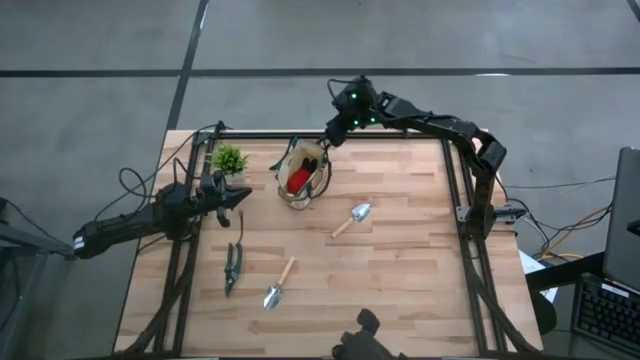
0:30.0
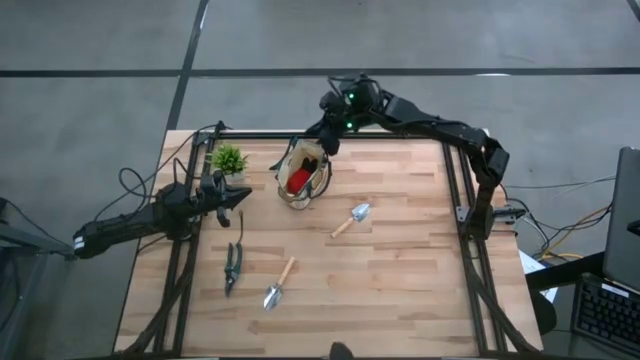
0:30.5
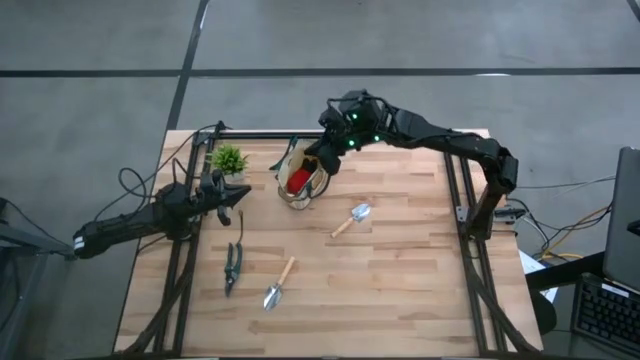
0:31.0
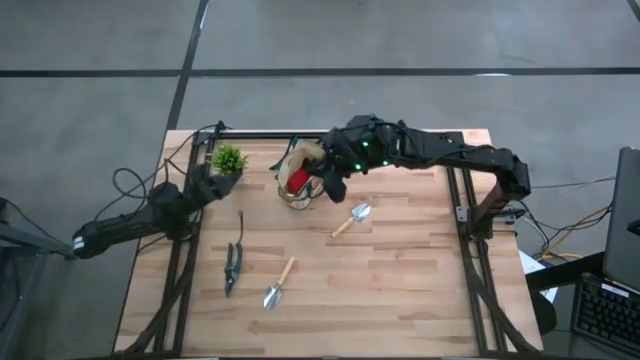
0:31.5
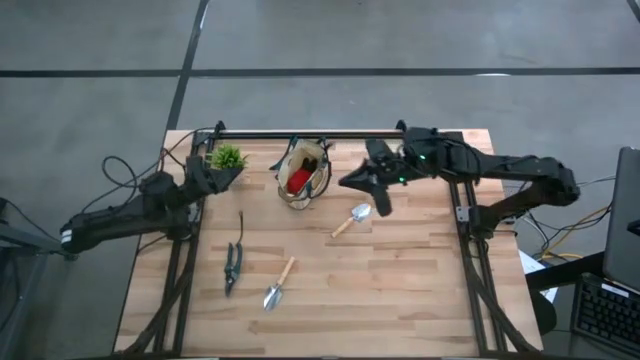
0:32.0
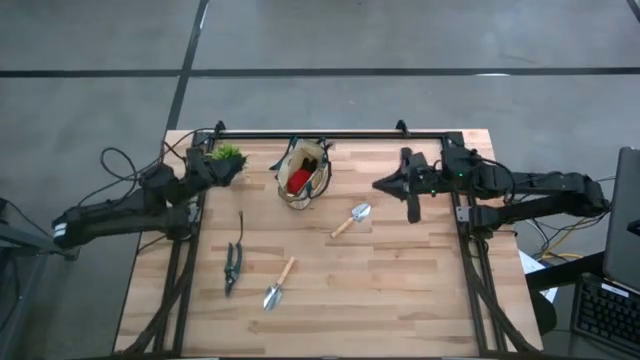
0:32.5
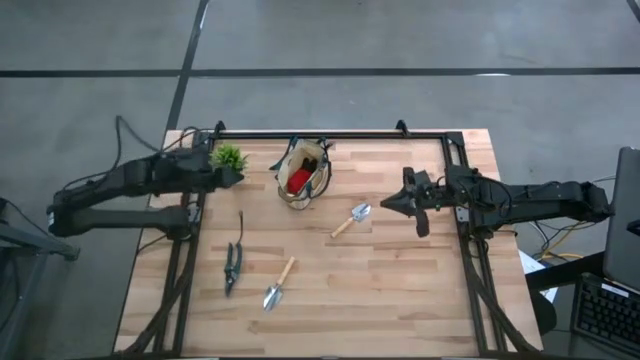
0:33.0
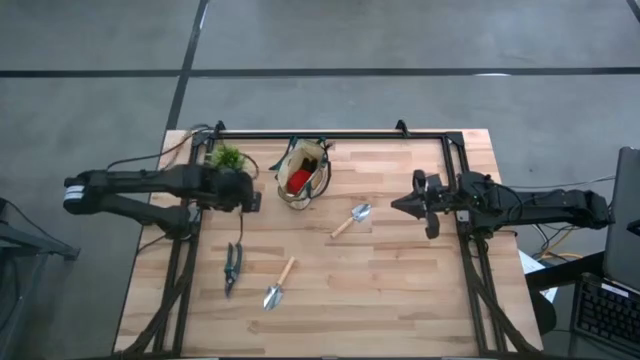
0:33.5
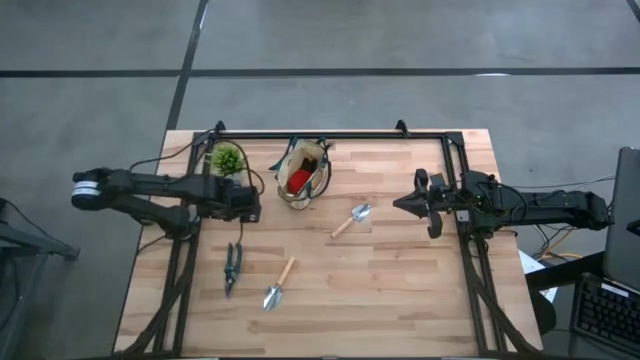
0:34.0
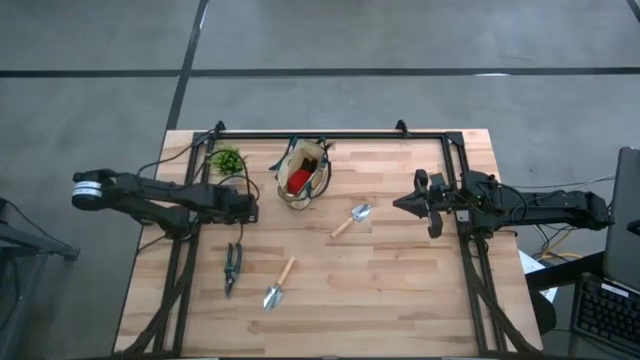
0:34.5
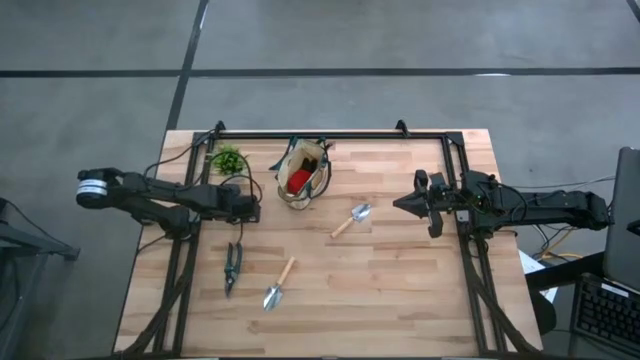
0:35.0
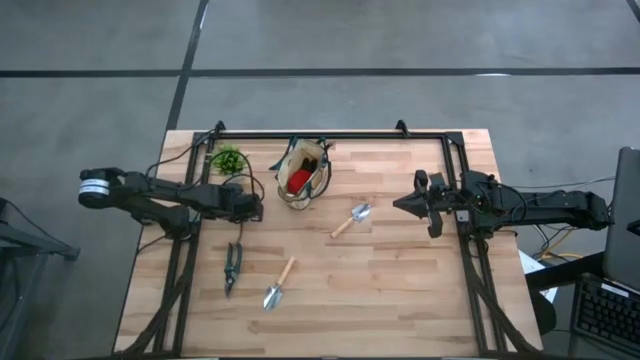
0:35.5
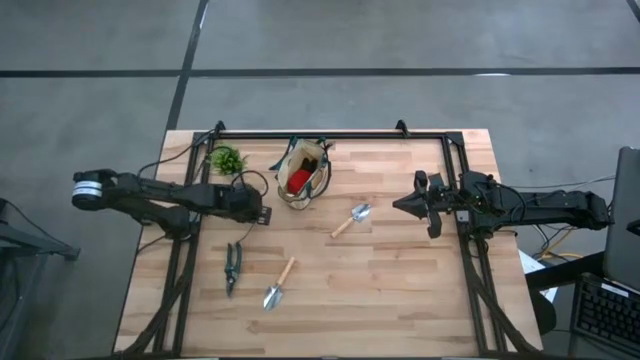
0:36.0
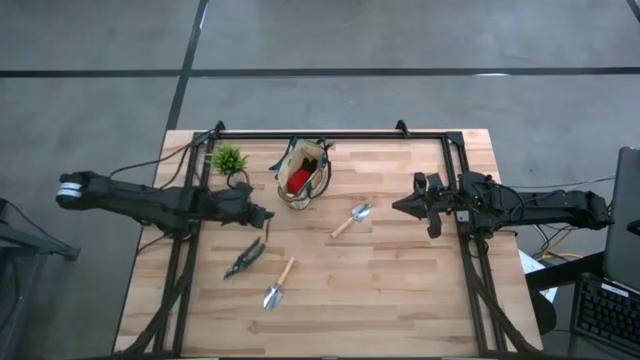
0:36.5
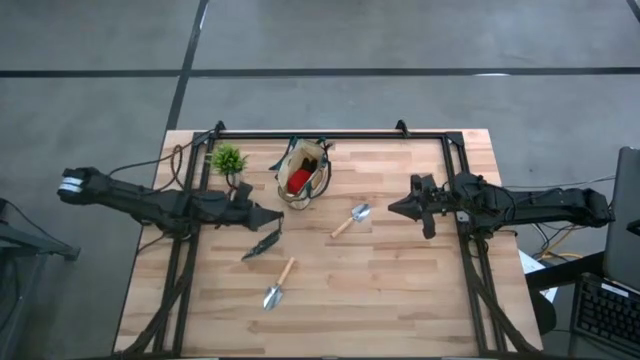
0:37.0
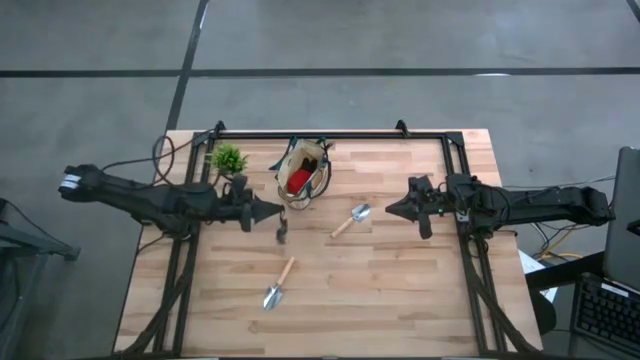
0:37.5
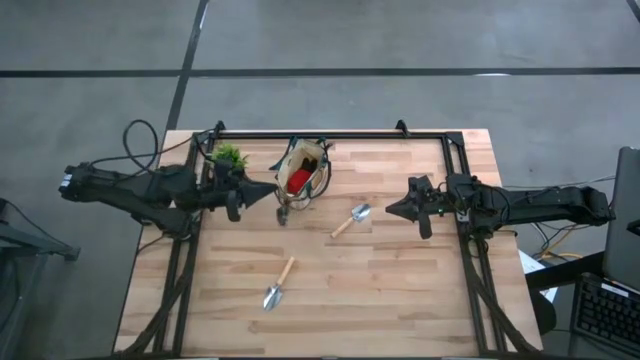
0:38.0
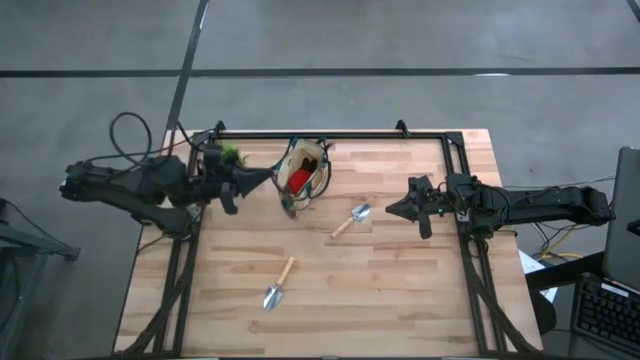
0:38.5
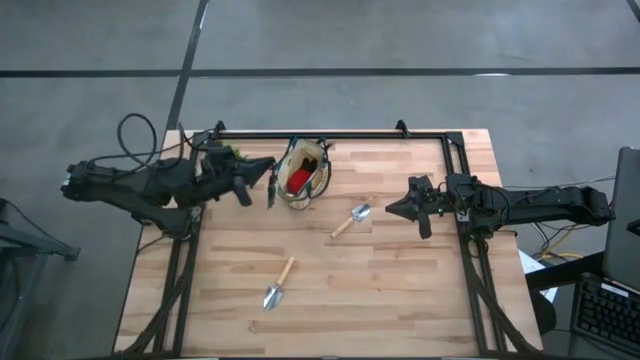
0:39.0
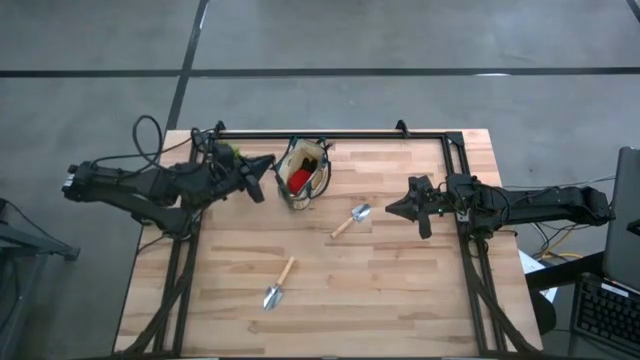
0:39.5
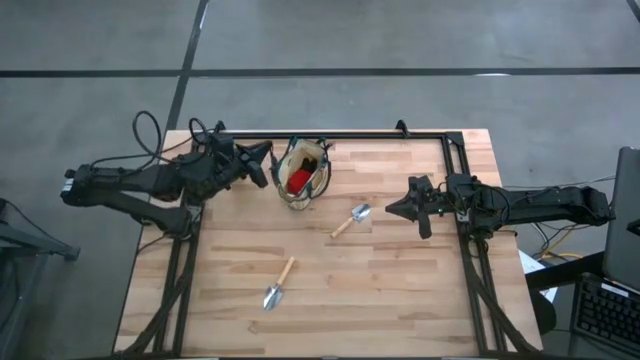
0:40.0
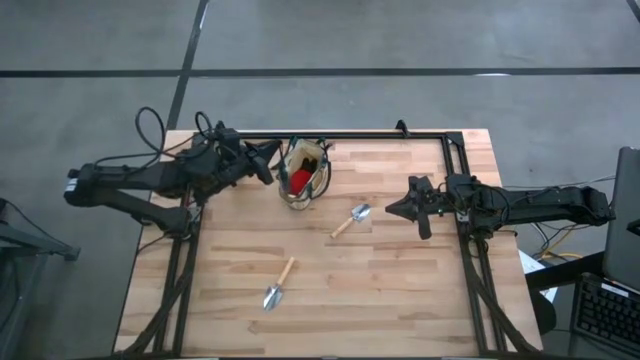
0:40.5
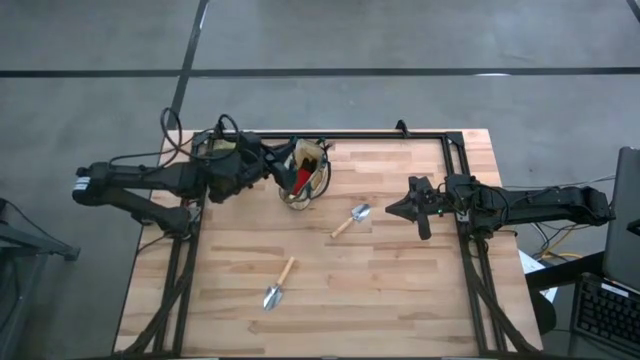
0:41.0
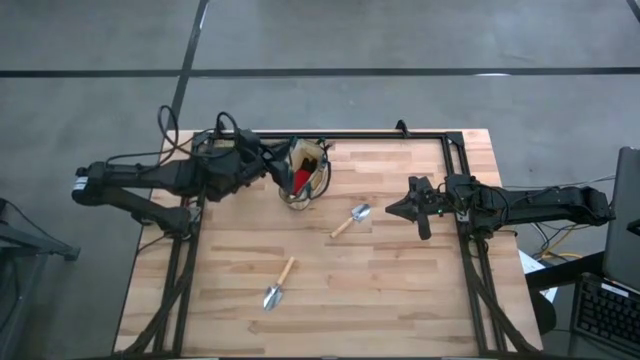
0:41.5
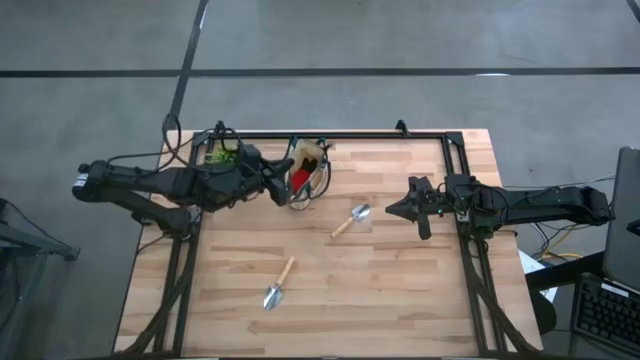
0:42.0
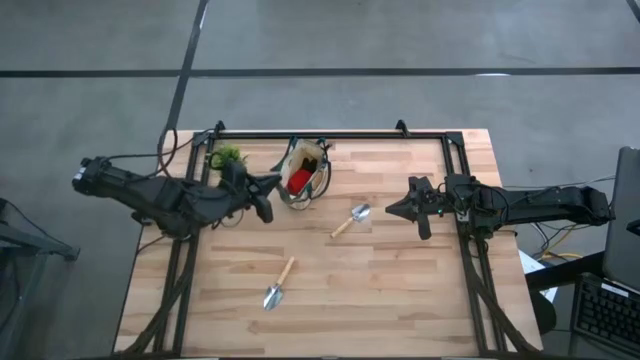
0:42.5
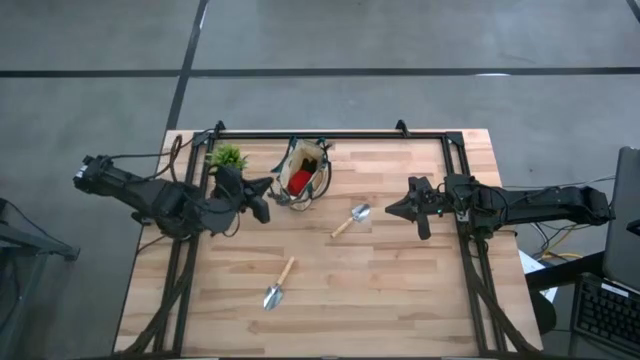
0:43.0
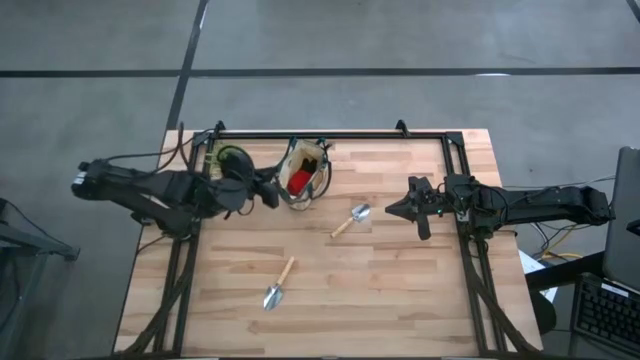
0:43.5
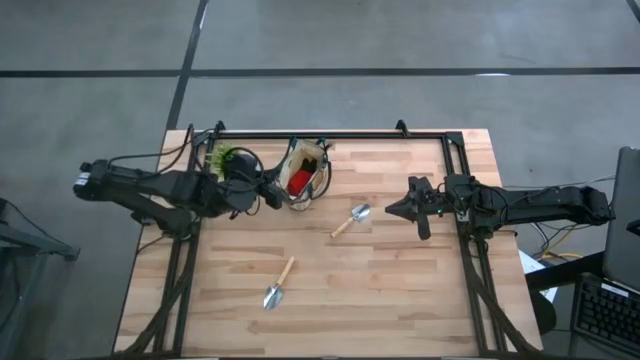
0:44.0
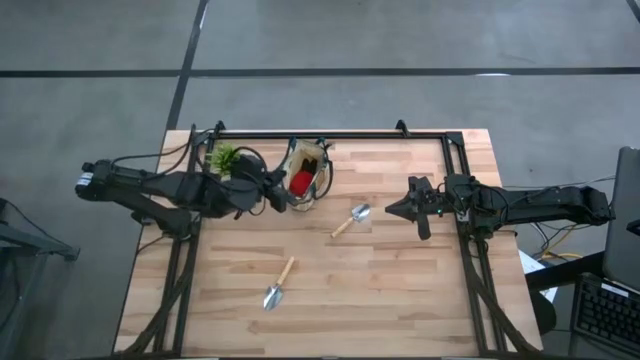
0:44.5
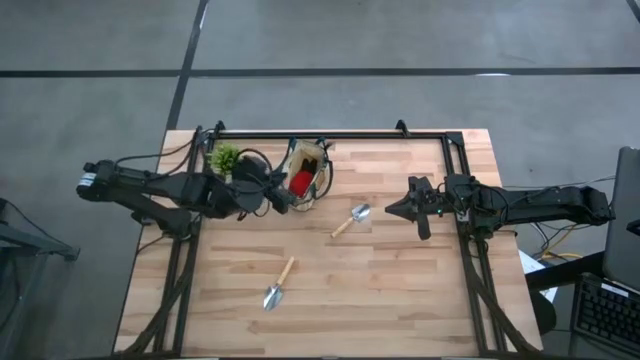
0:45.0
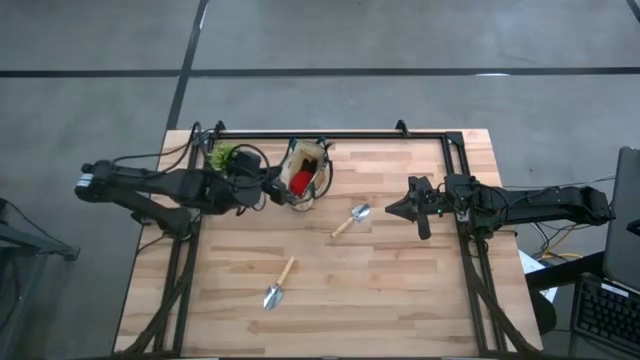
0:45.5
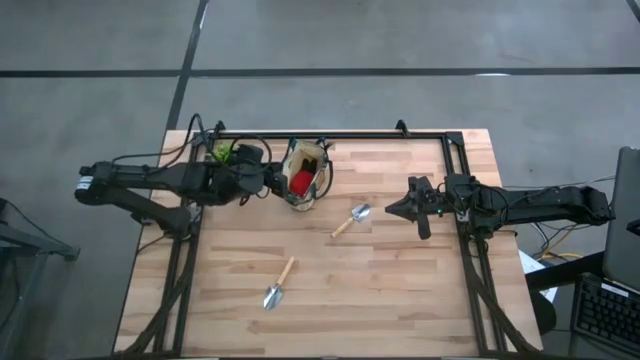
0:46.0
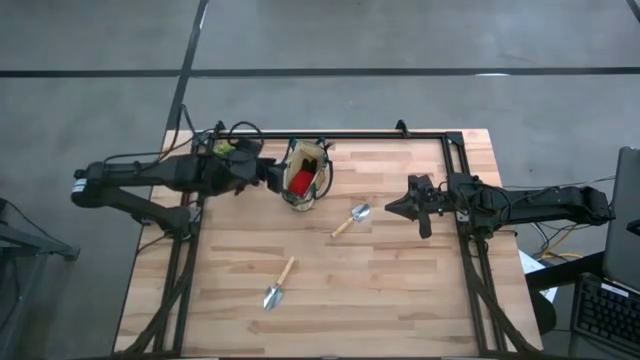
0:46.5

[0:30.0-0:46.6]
Task: Pick & Place Garden tools in Gardening bag
Put the green shear scissor into the green gardening bag

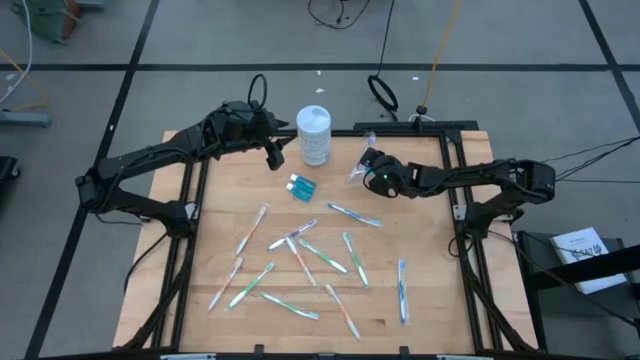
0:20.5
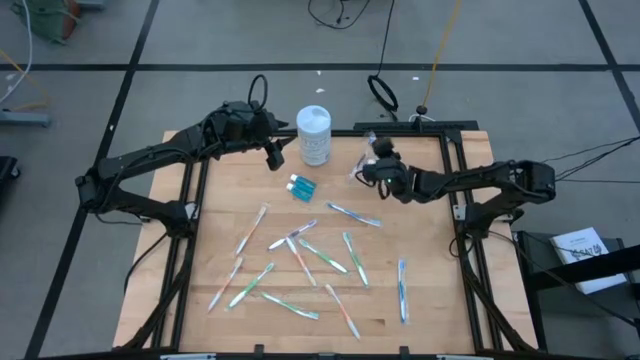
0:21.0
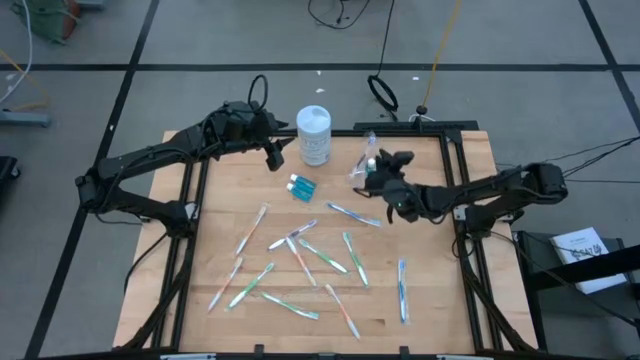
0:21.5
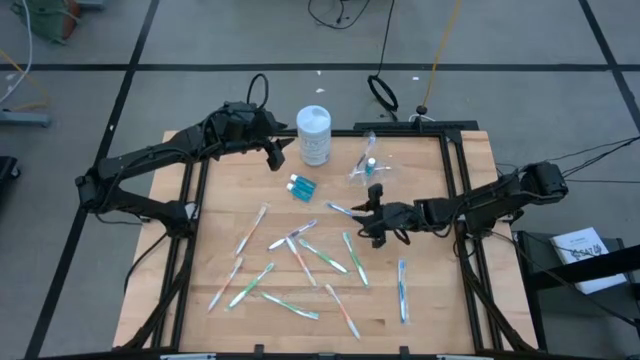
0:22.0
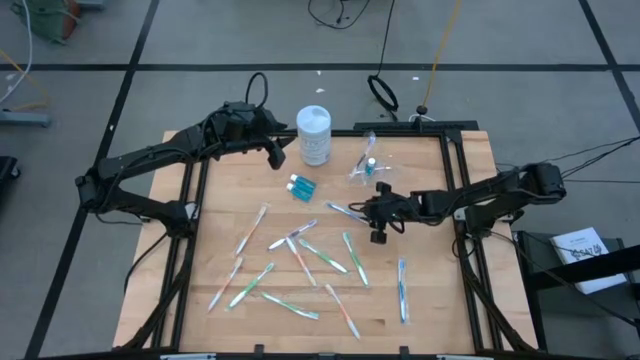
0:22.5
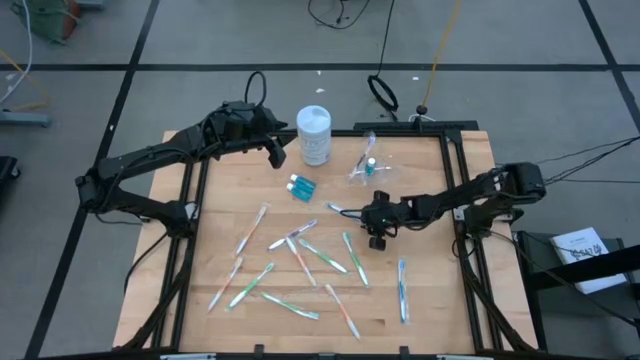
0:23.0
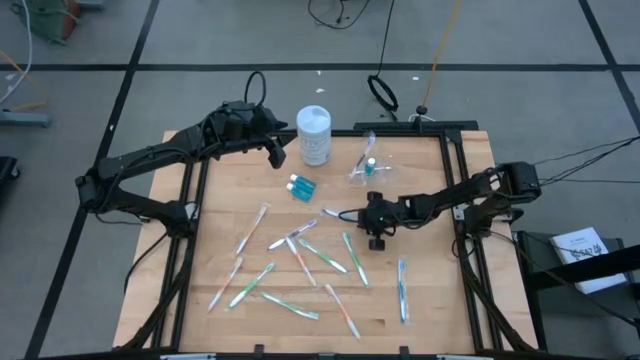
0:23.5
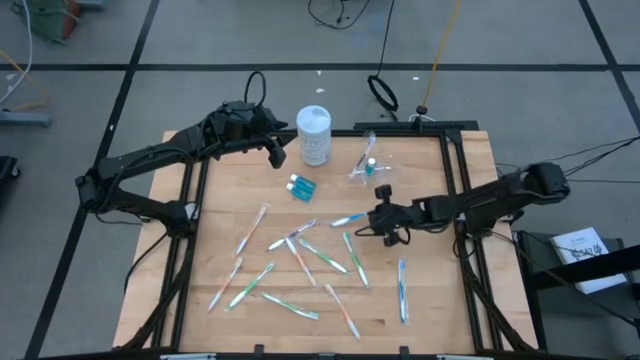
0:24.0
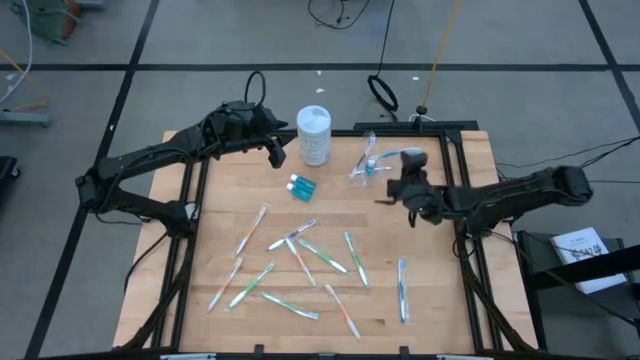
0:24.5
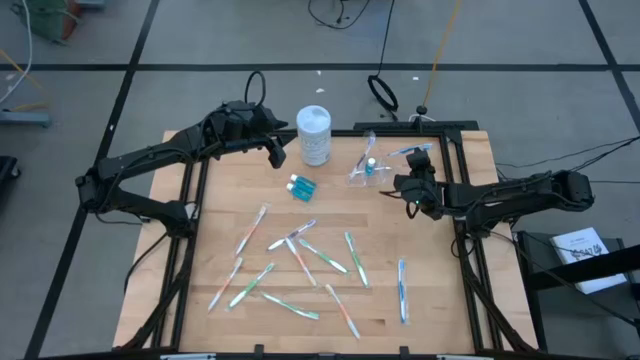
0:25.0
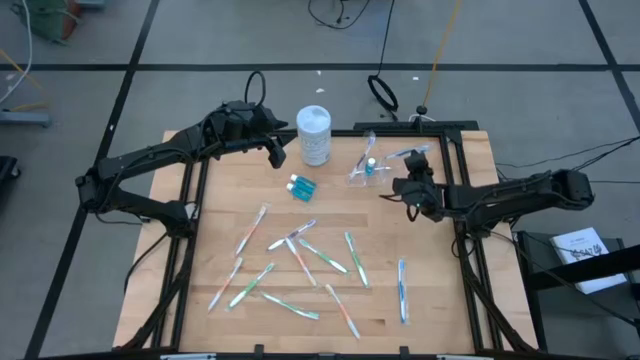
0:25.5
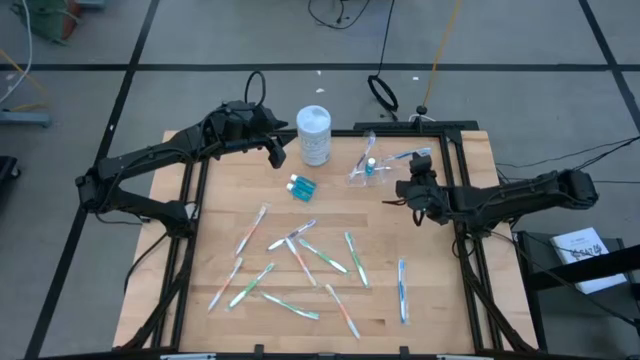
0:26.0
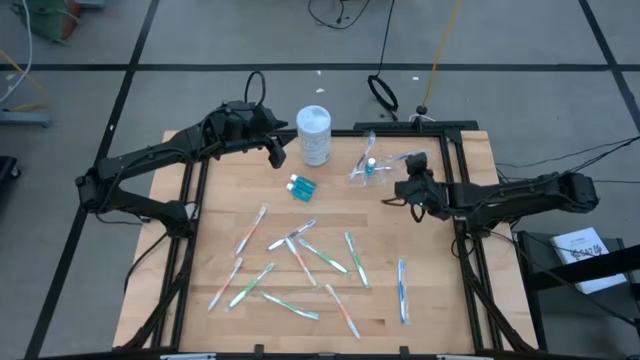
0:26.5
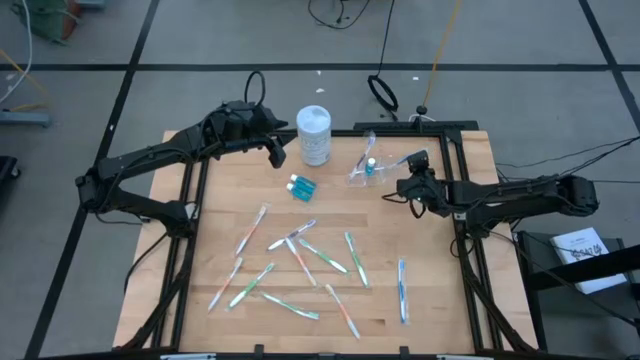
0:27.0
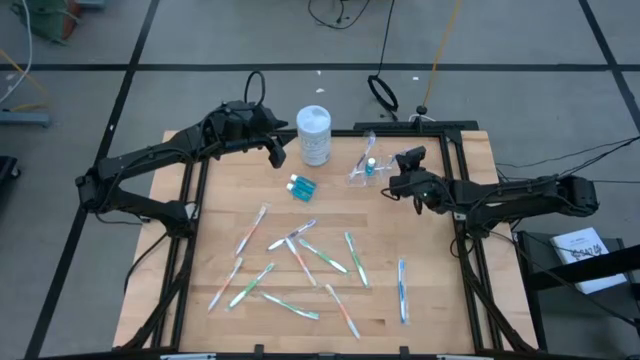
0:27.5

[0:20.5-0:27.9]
Task: Pick & Place toothbrushing station
Put the blue toothbrush into the transparent organizer
